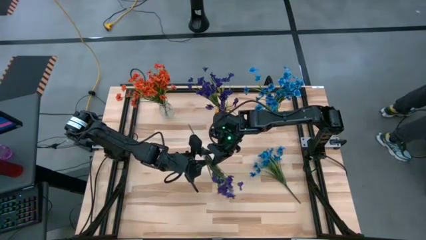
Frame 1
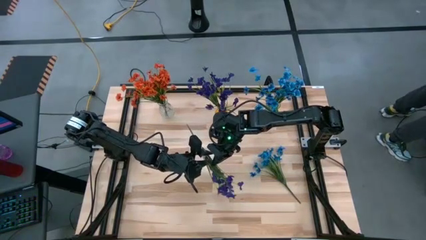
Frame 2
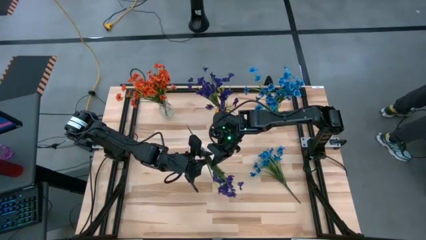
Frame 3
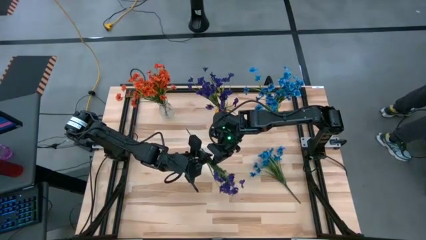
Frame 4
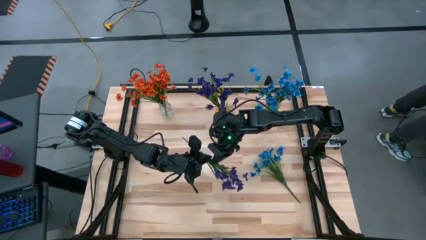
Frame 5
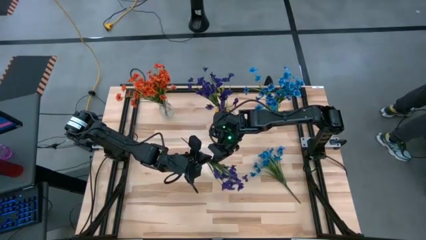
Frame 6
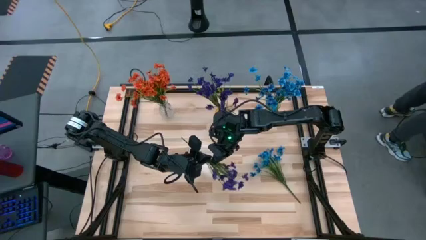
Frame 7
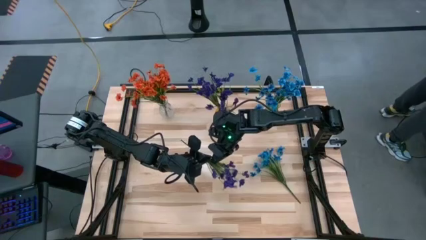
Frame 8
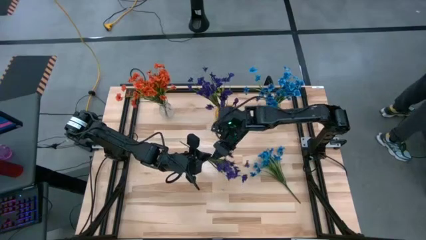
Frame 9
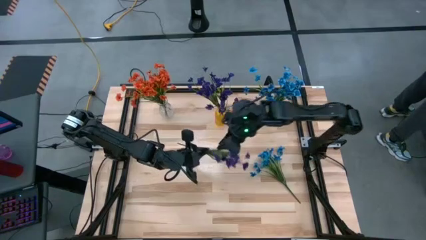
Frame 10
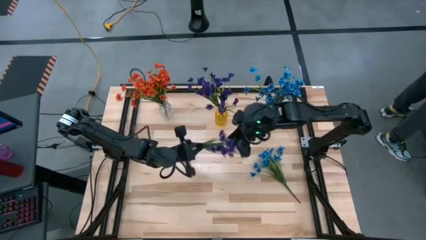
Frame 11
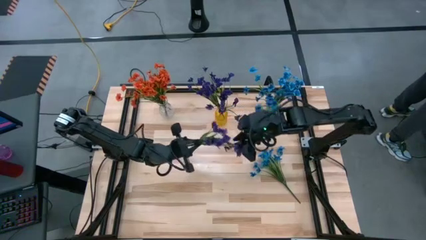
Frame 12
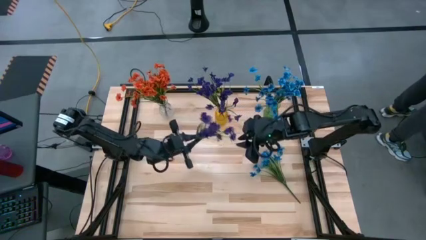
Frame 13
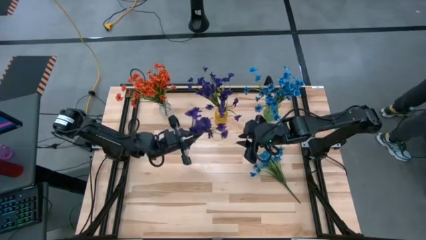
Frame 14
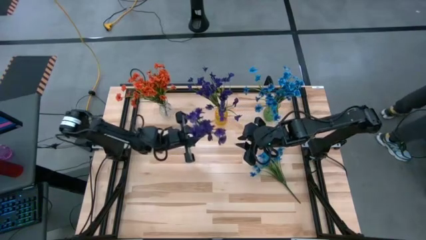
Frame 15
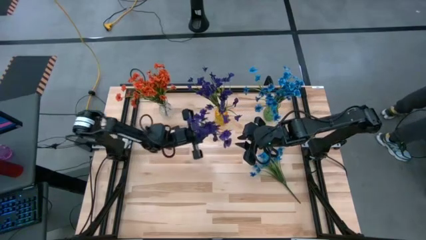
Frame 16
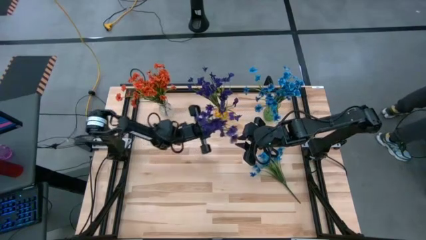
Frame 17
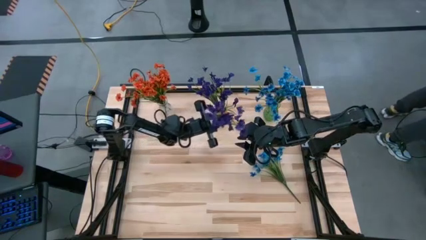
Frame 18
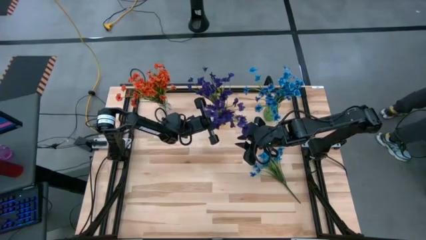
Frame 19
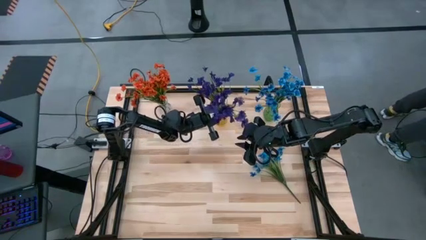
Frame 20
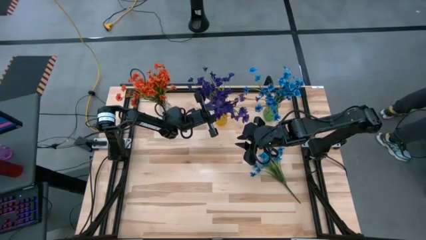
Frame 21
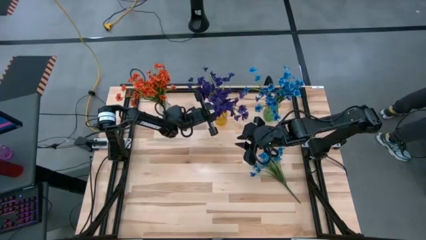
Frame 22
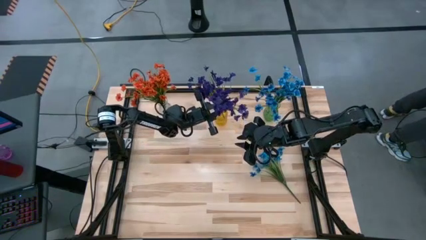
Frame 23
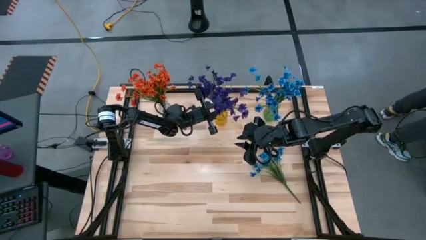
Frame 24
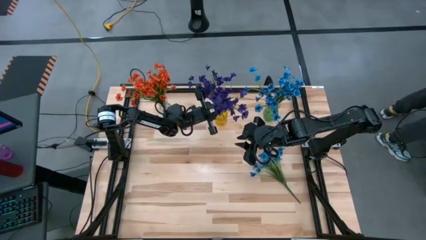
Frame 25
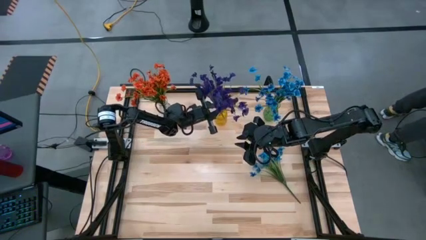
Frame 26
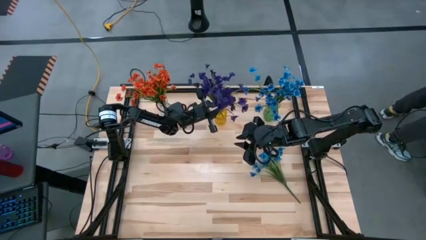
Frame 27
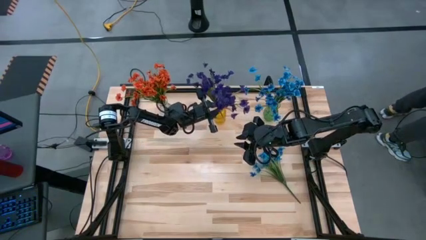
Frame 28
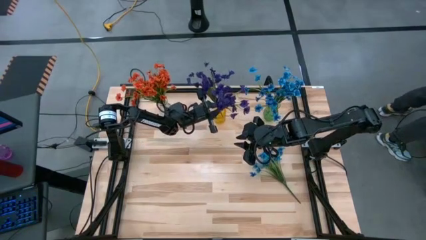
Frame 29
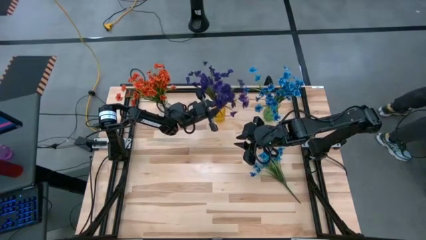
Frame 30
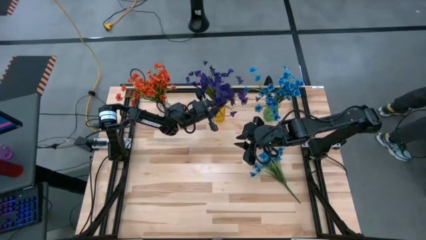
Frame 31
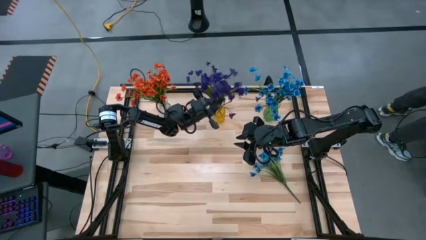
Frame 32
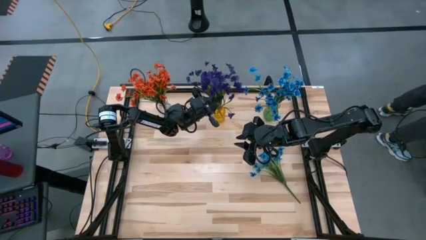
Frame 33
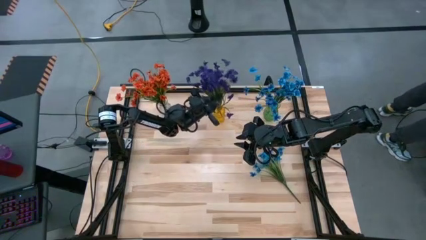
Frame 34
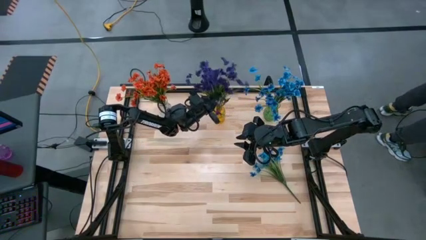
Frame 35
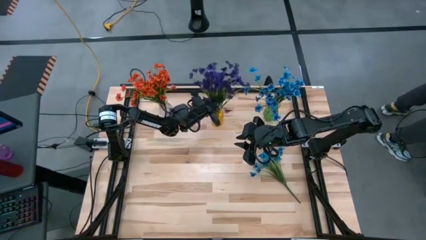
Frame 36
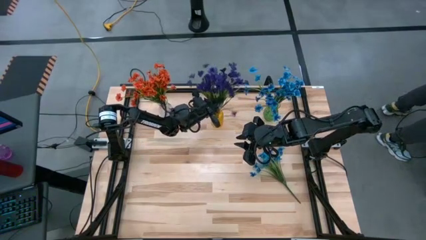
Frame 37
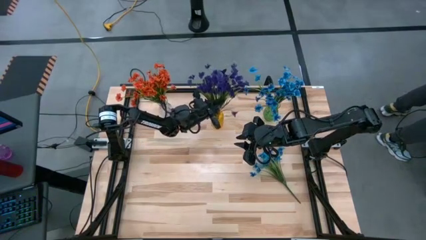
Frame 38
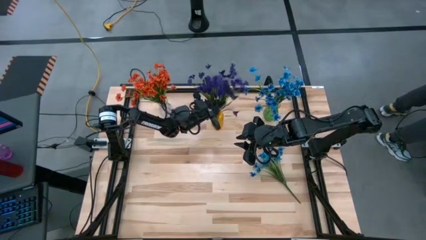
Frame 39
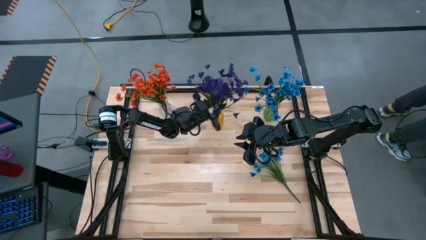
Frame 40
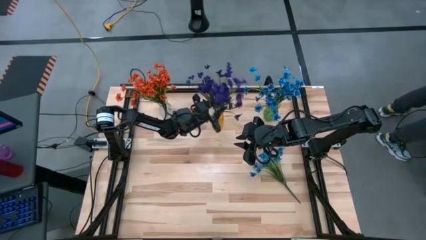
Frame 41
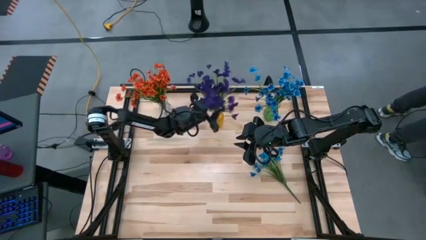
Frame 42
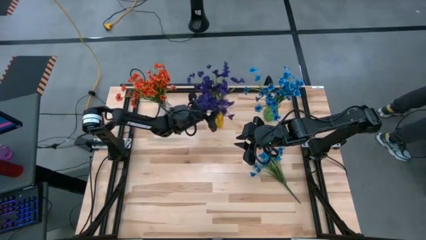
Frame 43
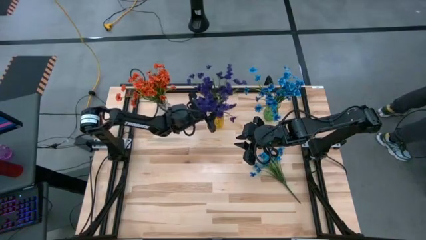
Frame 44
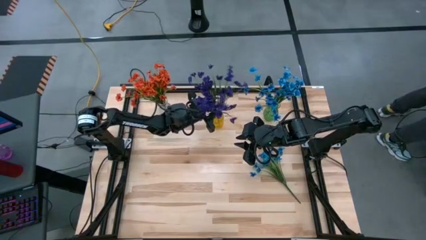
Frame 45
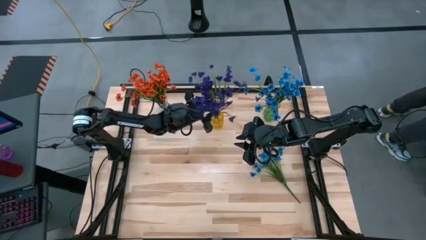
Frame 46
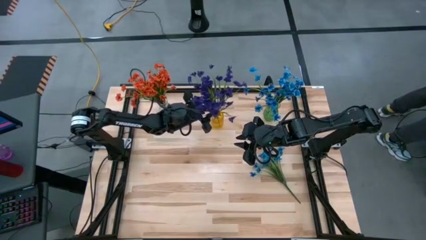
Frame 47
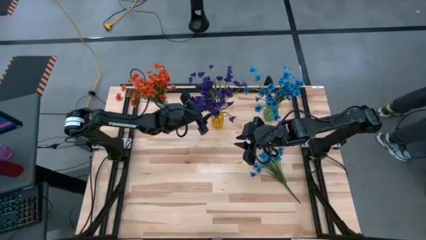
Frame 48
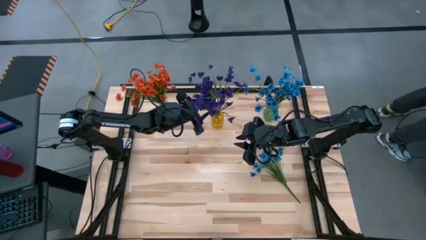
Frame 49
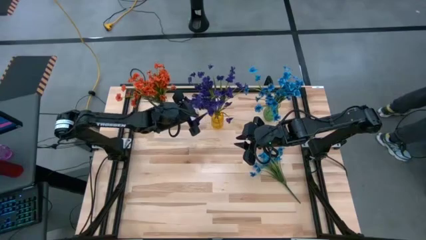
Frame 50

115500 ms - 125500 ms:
Task: Sort flowers into vase by color
Put the purple flower into the orange vase
